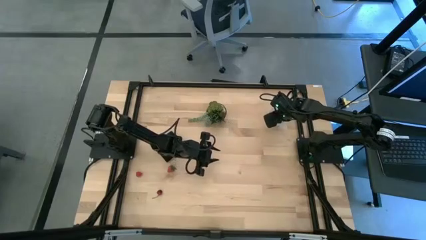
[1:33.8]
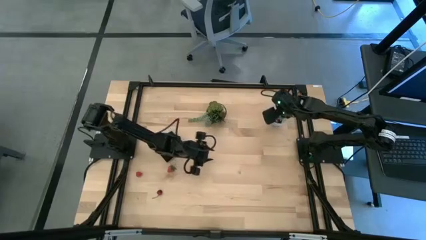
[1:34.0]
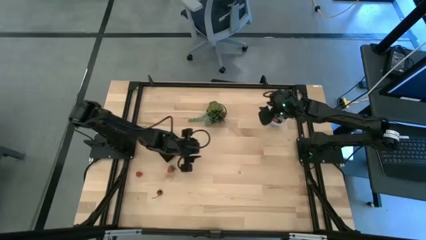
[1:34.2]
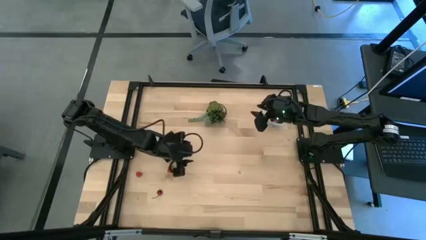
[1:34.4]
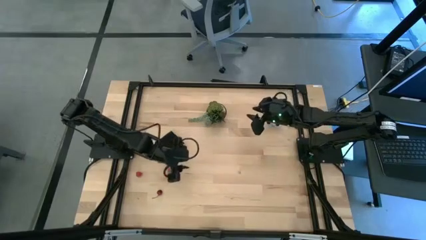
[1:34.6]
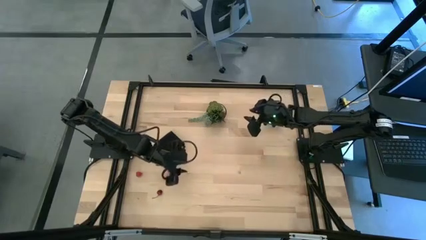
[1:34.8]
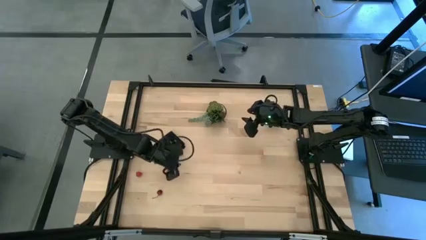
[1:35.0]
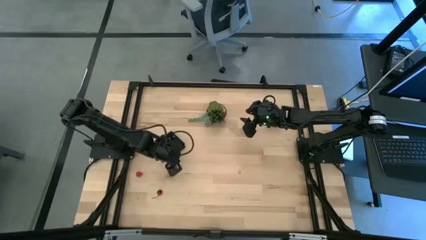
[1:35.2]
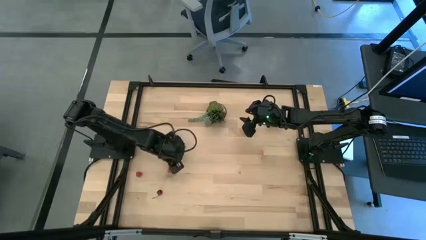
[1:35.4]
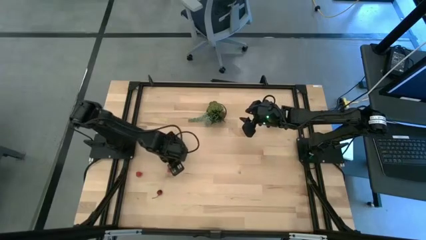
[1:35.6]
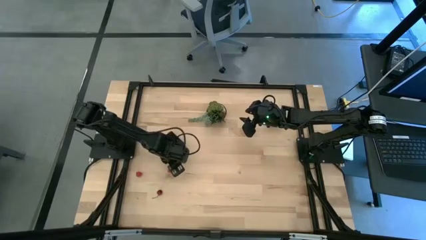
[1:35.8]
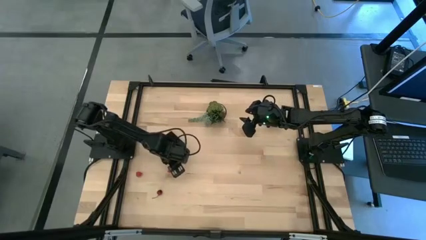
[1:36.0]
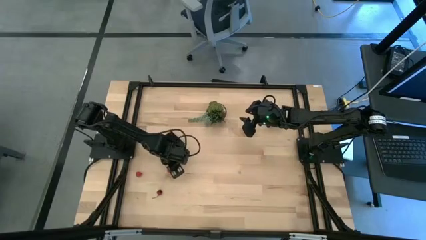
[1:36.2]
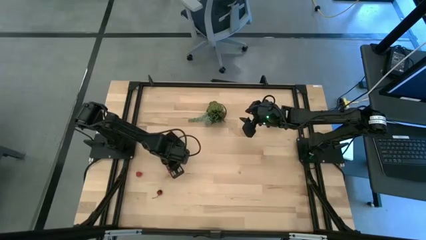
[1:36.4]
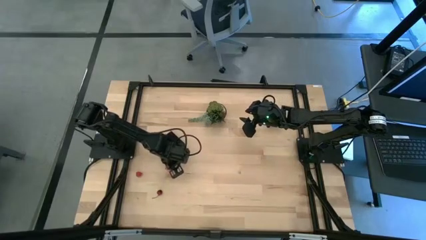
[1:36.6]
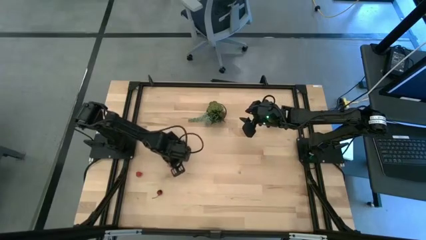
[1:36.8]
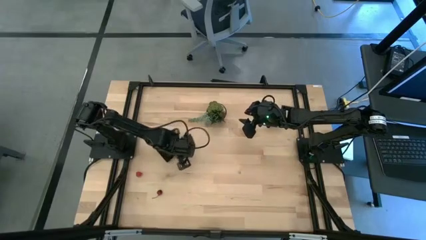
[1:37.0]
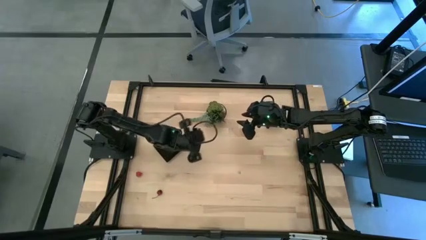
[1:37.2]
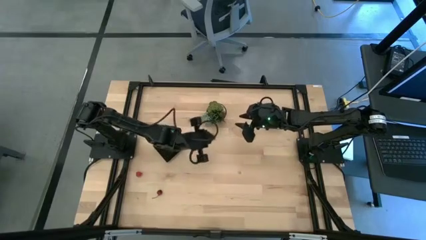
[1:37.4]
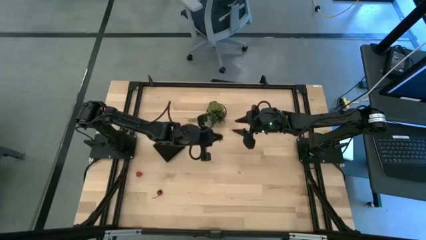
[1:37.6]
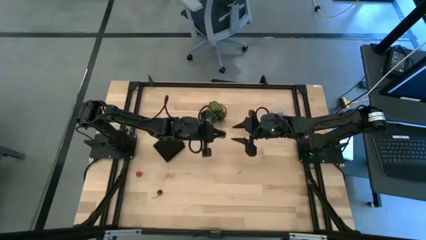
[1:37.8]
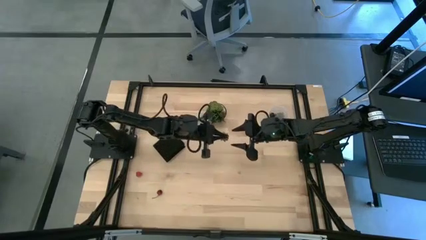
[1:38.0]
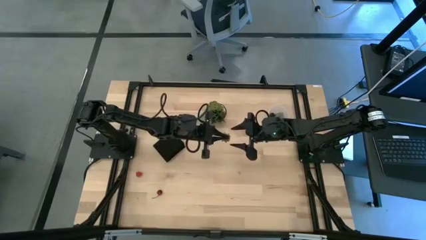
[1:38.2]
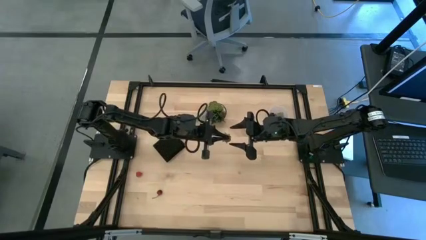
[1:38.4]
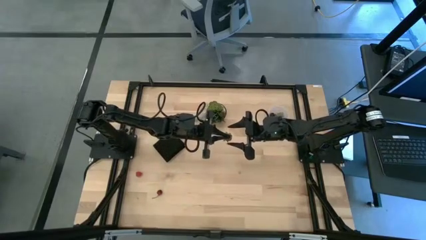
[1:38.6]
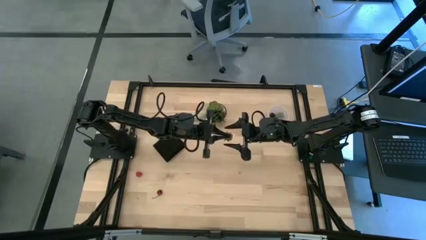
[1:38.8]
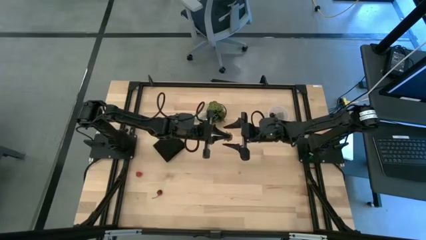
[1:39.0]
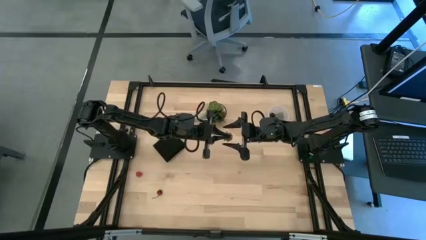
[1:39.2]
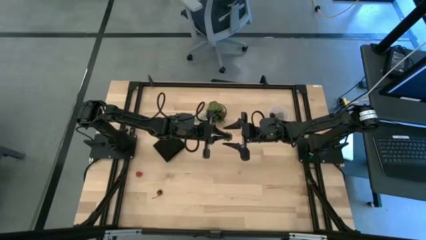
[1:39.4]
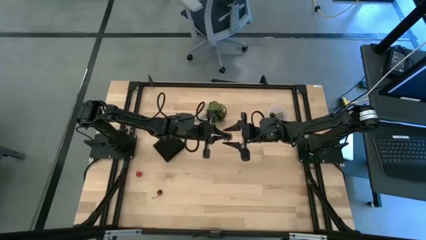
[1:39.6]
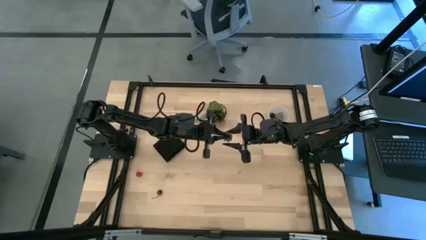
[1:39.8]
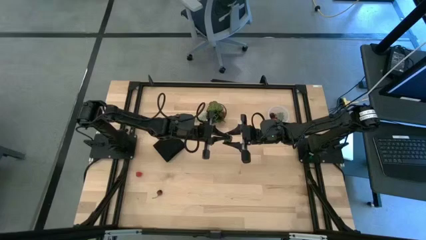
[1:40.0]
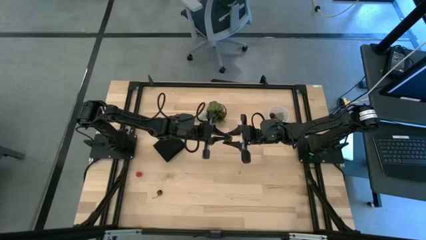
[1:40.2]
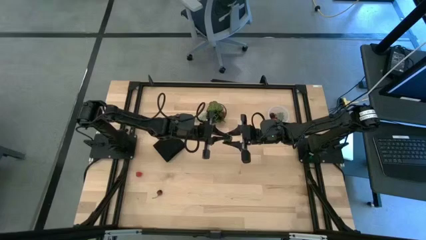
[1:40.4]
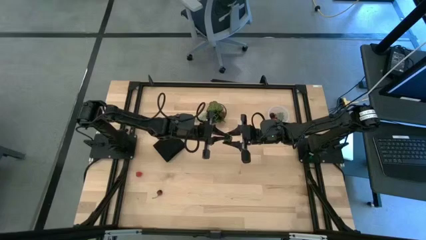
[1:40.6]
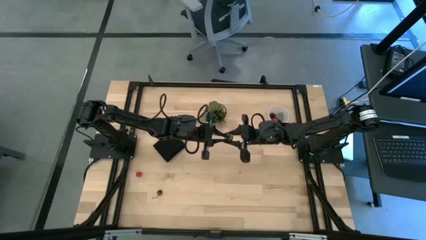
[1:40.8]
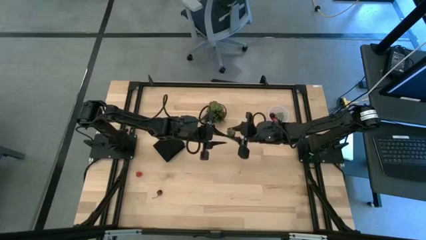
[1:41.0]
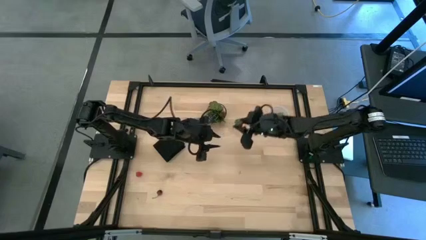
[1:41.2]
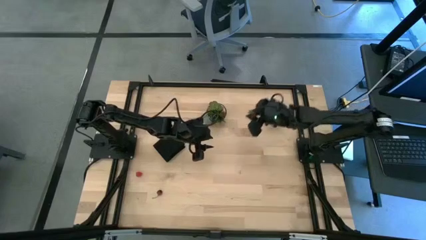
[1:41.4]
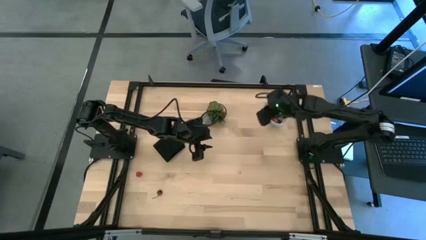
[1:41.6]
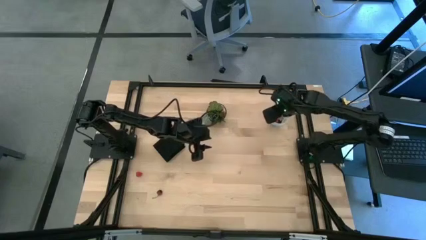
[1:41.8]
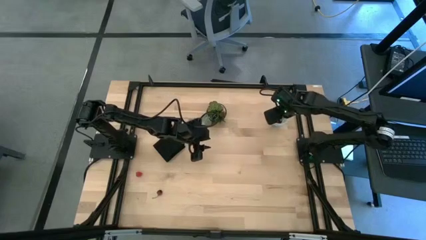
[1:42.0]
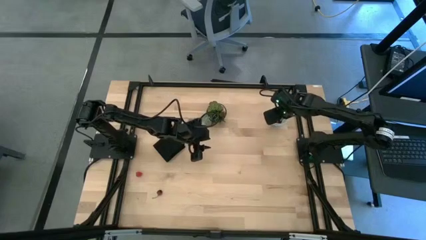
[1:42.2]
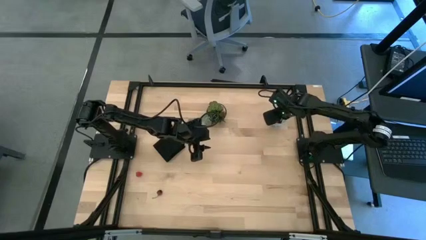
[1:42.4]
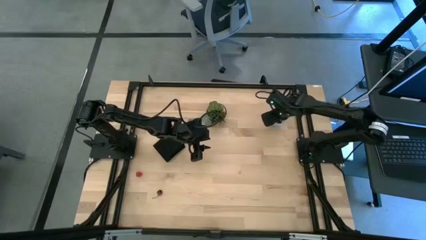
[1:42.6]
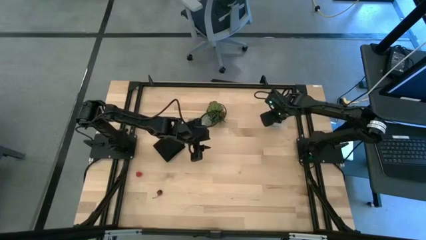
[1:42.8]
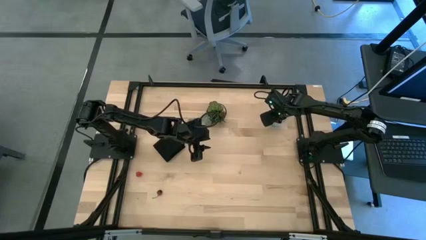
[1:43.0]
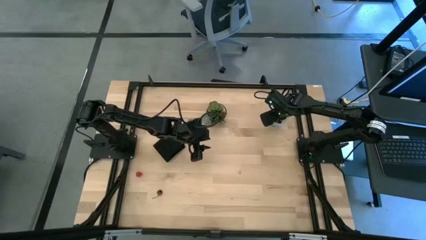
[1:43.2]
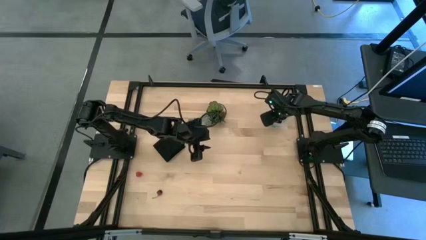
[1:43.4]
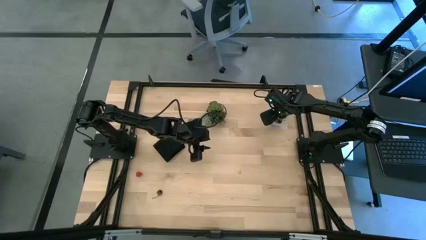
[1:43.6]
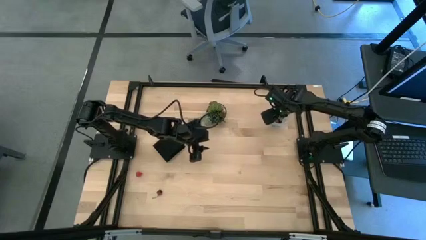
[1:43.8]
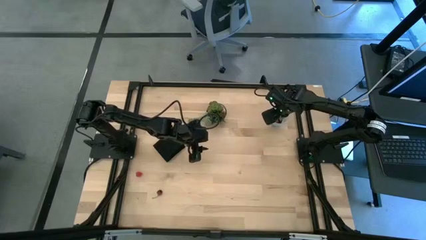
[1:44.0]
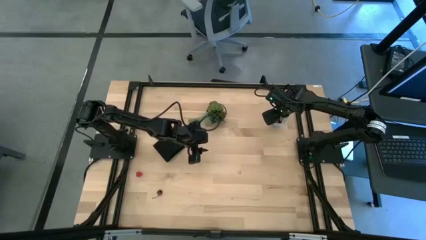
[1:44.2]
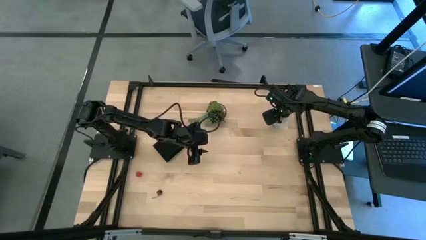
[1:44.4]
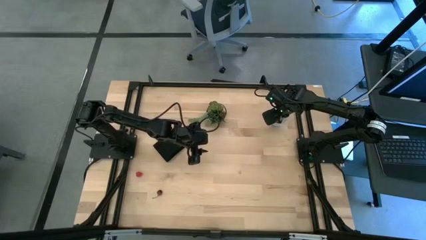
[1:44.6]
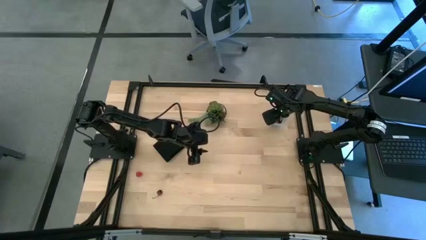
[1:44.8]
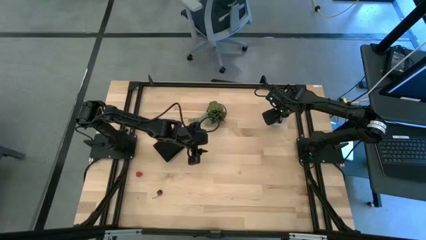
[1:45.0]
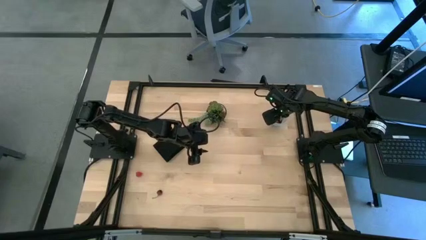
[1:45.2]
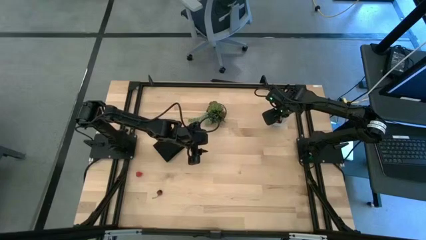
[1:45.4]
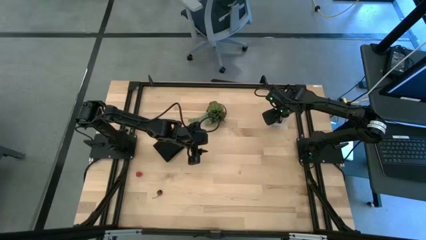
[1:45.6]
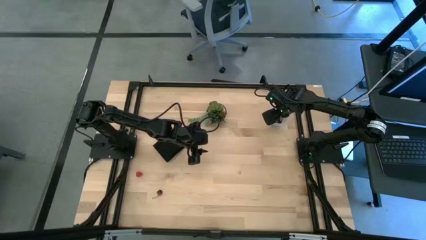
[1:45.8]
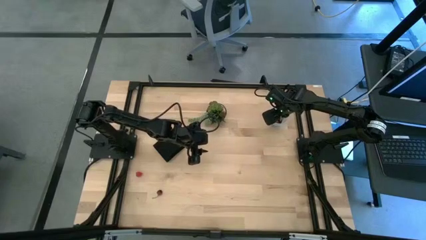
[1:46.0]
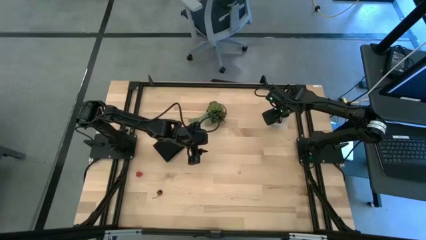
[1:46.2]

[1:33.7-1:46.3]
Task: Pick and placing Produce into tupperware
Put the red strawberry into the bin

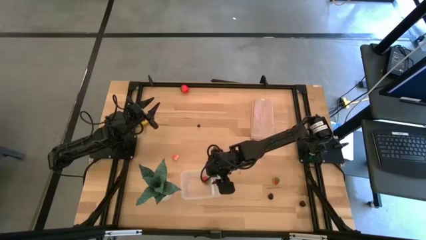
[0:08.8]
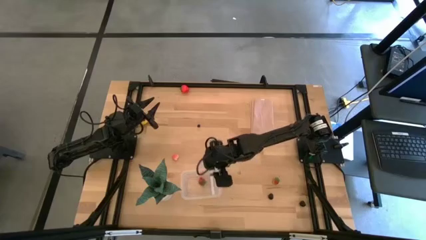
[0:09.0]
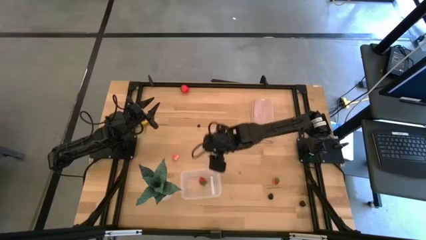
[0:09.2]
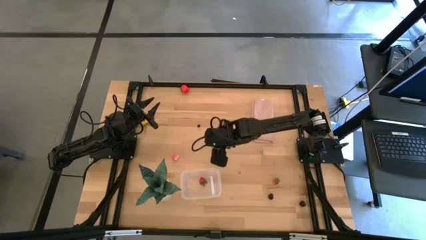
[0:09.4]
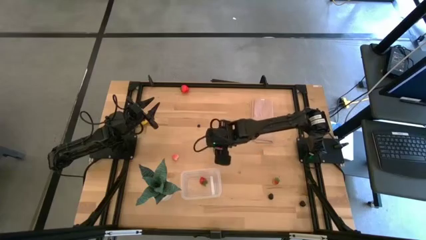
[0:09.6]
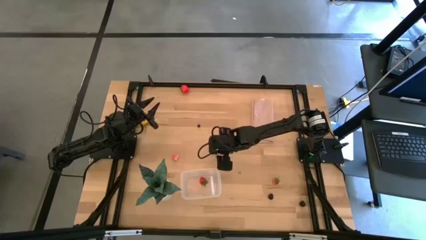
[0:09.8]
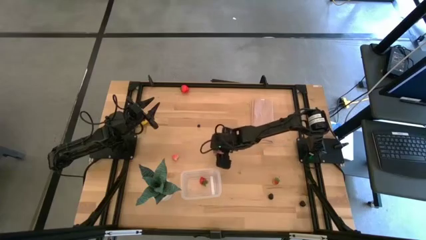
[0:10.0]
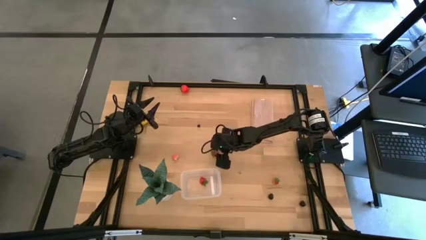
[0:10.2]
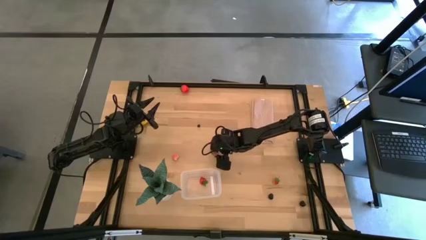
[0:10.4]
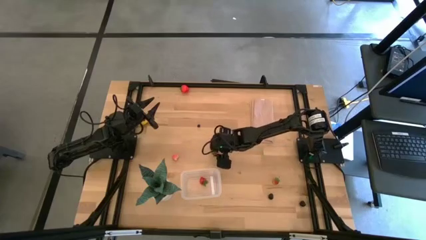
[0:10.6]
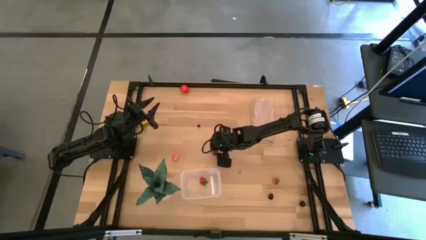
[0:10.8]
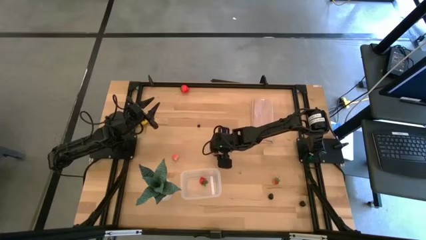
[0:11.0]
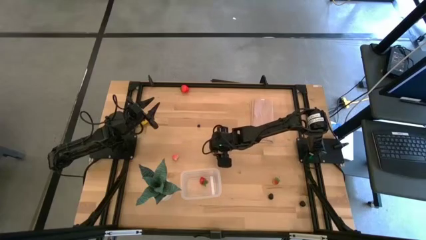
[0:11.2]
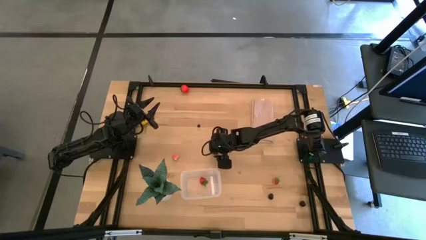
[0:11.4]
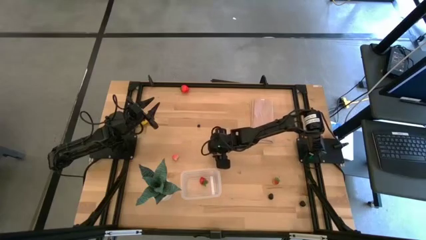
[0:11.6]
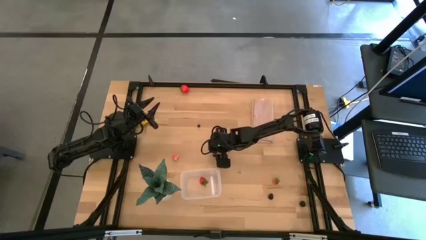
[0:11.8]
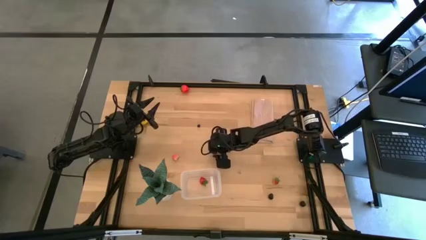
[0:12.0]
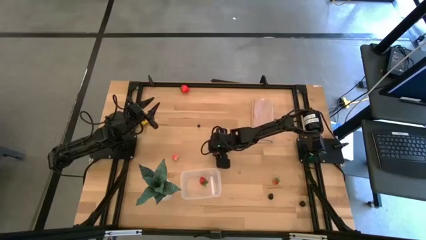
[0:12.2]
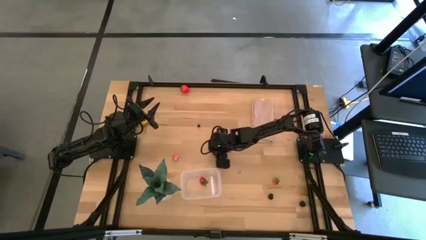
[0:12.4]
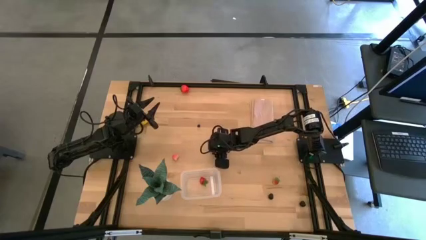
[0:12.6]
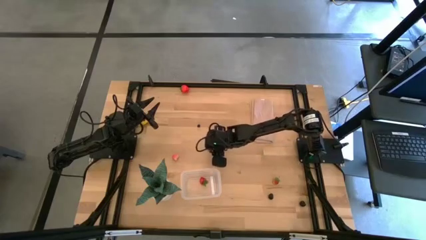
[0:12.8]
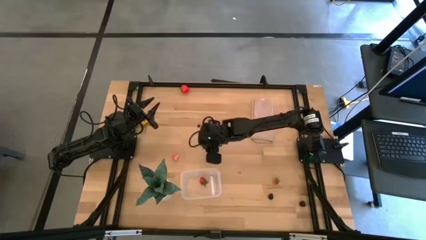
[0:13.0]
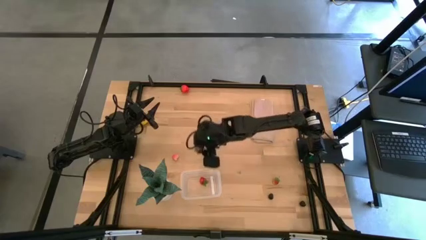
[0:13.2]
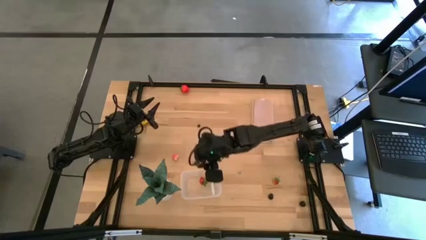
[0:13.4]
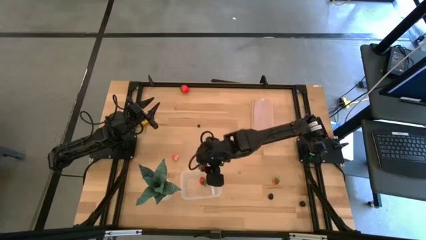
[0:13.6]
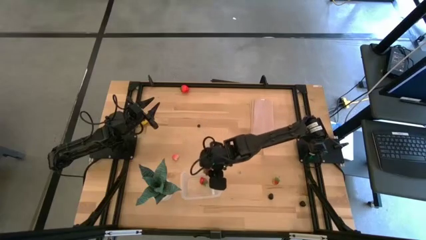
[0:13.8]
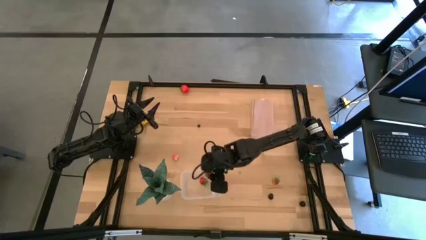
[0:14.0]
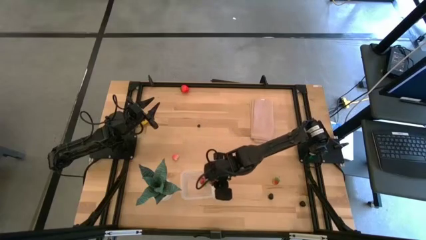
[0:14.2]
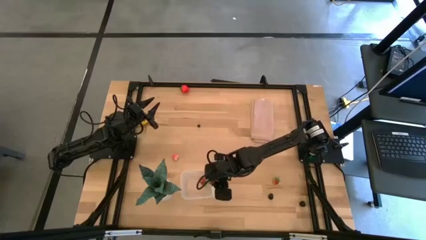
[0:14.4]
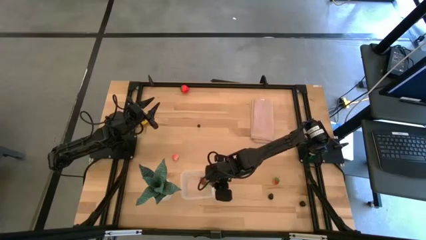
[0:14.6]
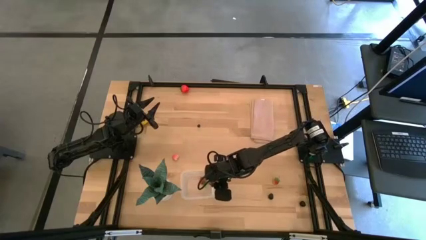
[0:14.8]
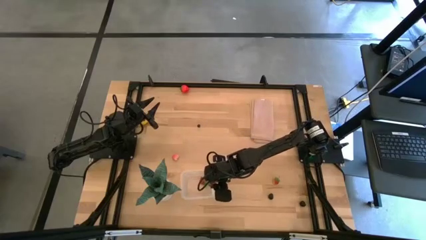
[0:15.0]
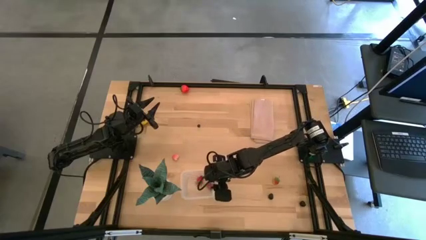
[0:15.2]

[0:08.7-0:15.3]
Task: Pick and placing Produce into tupperware
Put the center red strawberry into the transparent bin
